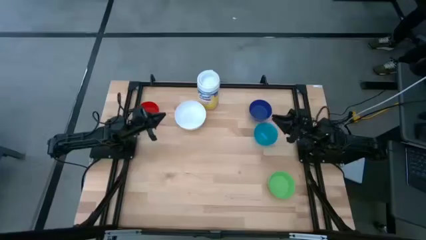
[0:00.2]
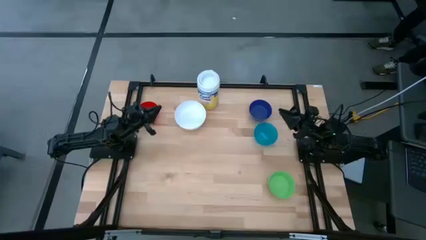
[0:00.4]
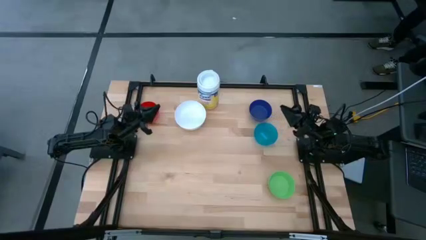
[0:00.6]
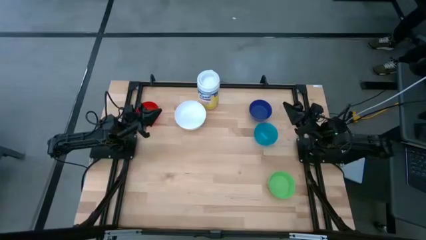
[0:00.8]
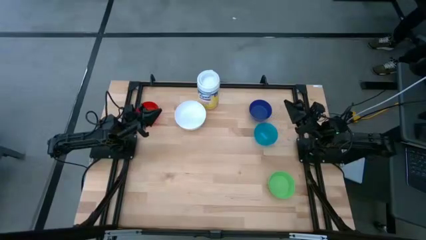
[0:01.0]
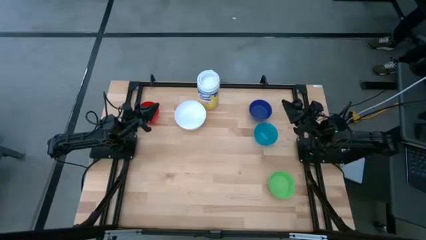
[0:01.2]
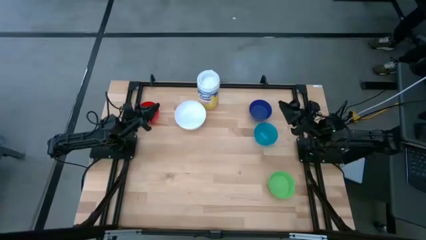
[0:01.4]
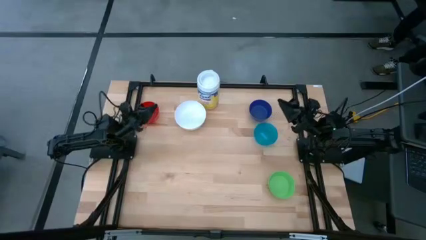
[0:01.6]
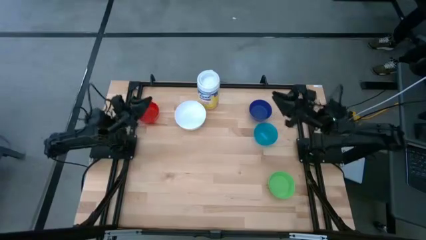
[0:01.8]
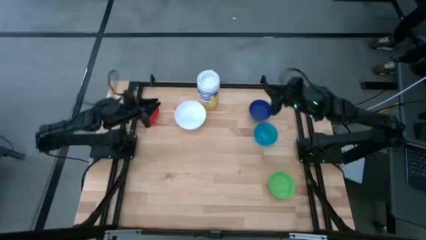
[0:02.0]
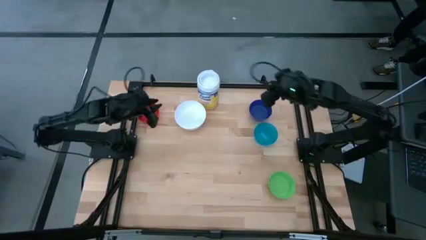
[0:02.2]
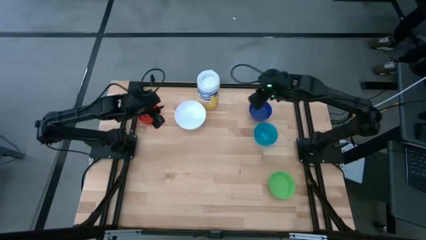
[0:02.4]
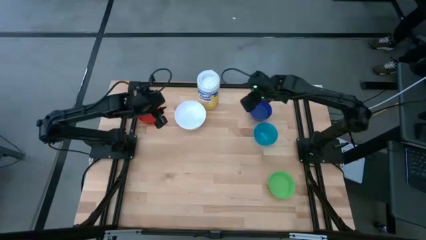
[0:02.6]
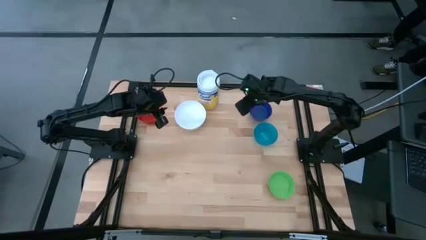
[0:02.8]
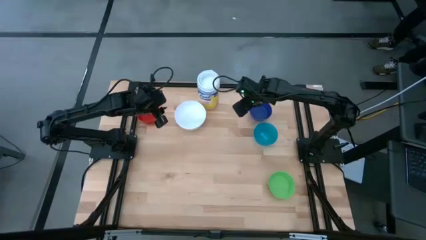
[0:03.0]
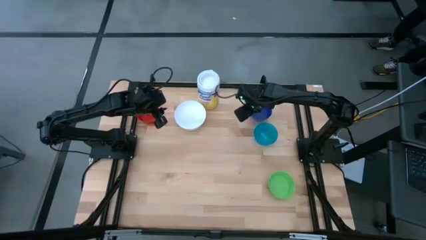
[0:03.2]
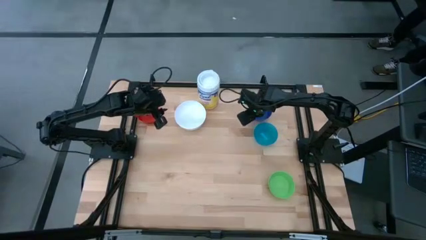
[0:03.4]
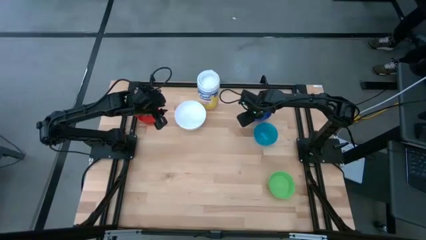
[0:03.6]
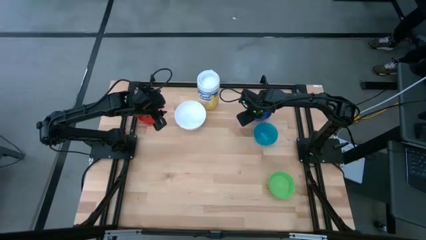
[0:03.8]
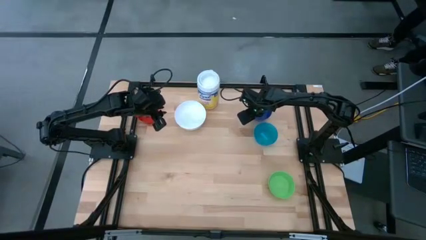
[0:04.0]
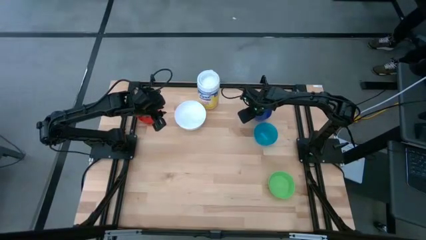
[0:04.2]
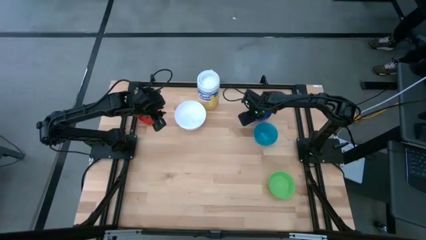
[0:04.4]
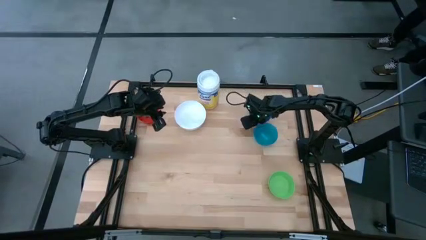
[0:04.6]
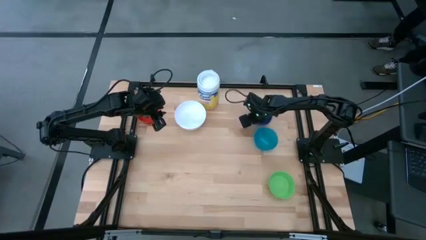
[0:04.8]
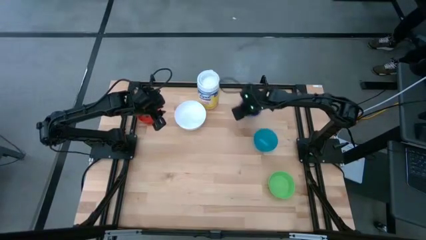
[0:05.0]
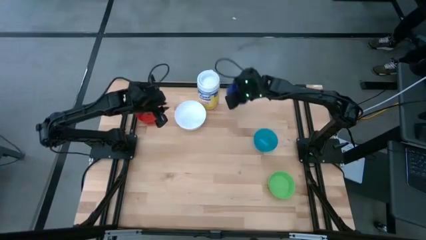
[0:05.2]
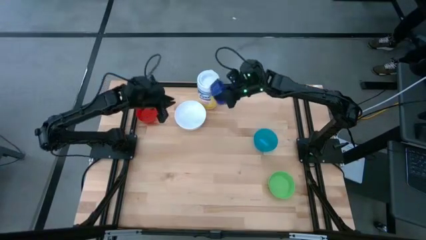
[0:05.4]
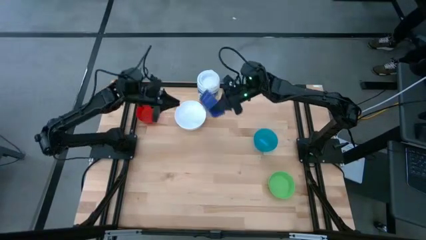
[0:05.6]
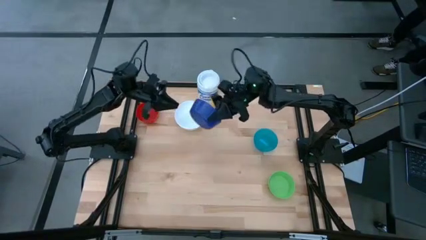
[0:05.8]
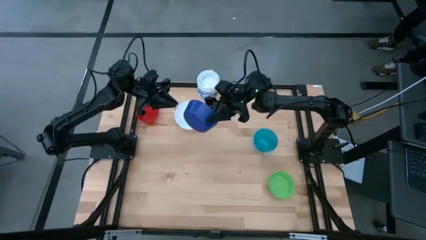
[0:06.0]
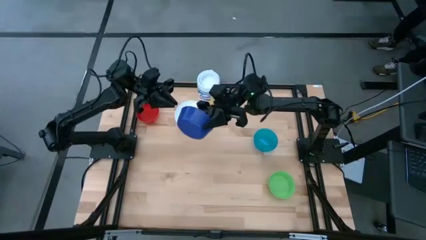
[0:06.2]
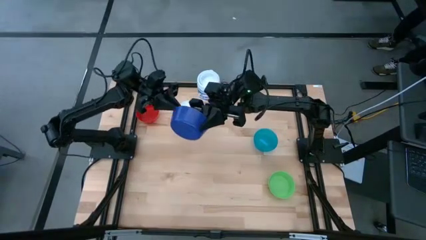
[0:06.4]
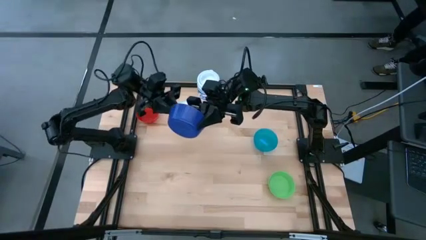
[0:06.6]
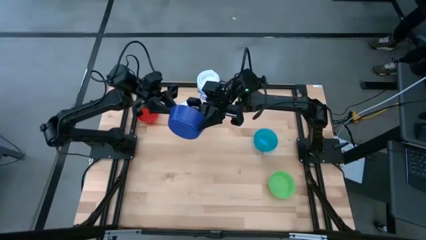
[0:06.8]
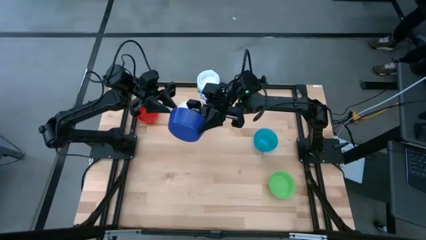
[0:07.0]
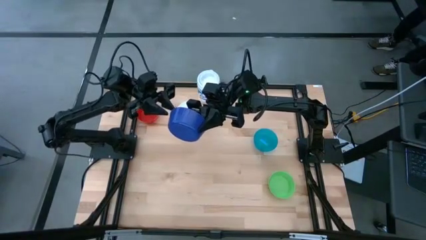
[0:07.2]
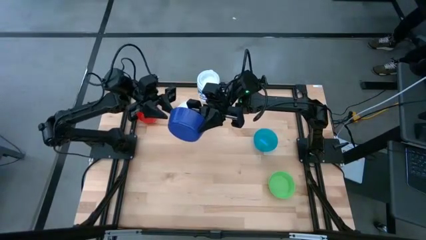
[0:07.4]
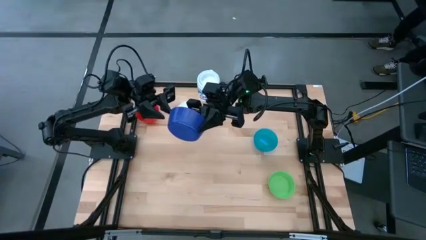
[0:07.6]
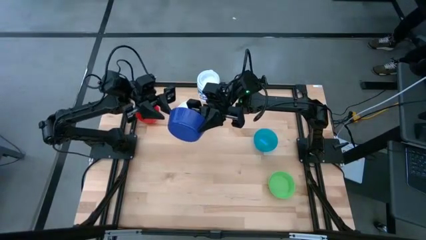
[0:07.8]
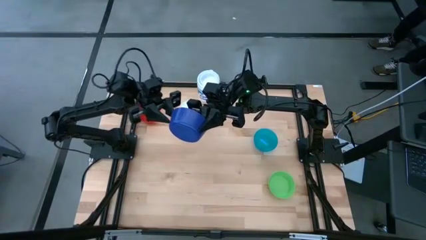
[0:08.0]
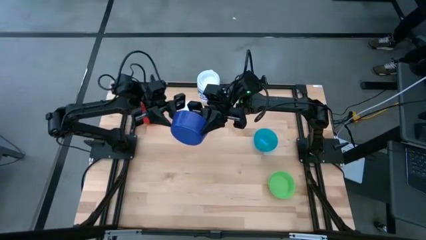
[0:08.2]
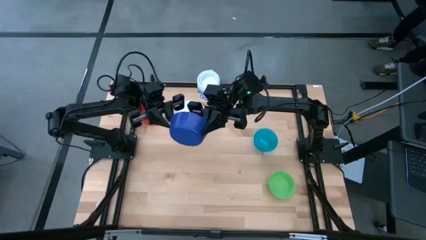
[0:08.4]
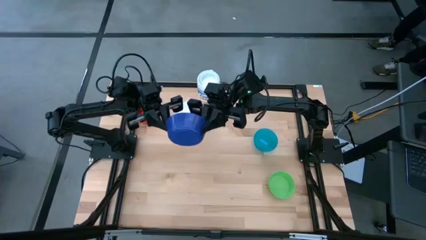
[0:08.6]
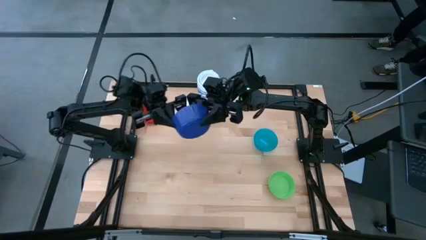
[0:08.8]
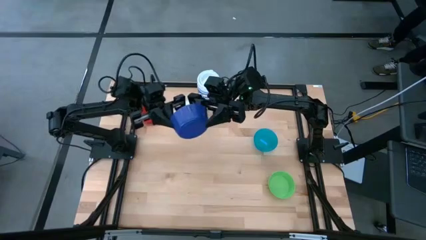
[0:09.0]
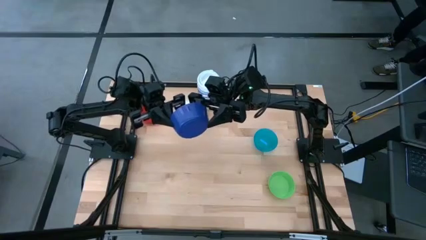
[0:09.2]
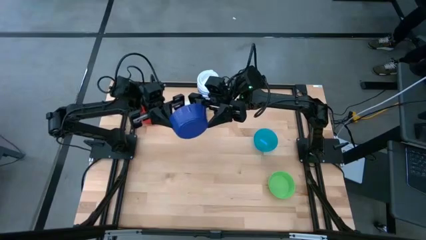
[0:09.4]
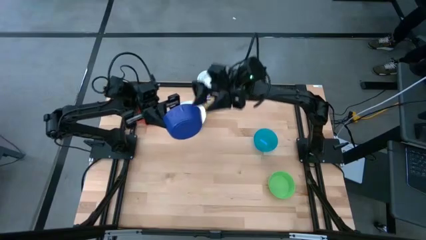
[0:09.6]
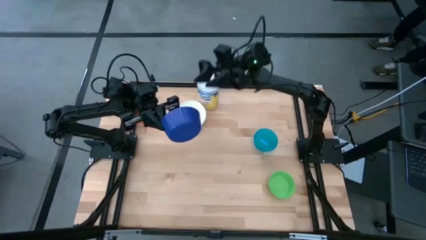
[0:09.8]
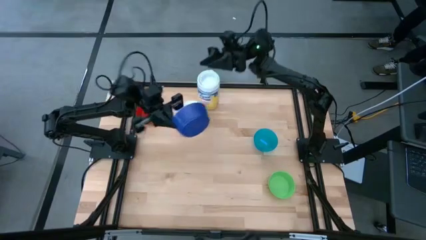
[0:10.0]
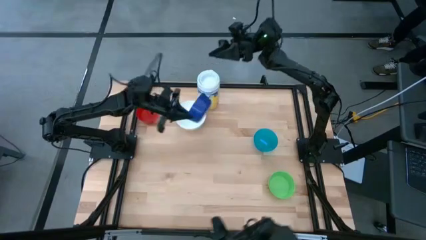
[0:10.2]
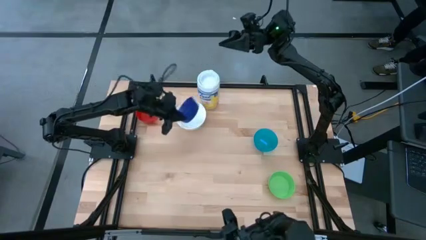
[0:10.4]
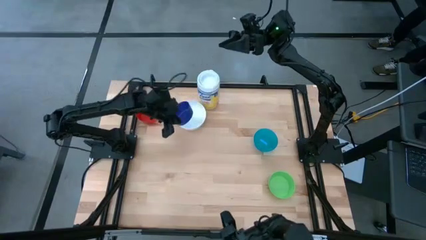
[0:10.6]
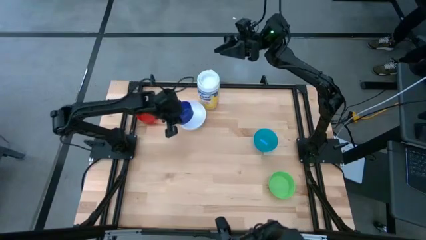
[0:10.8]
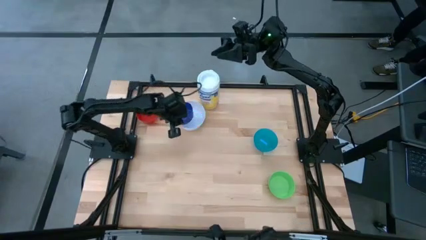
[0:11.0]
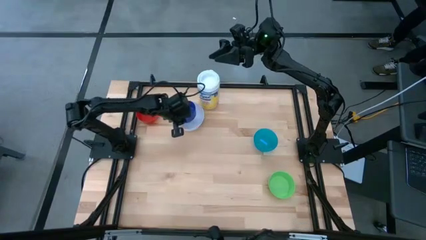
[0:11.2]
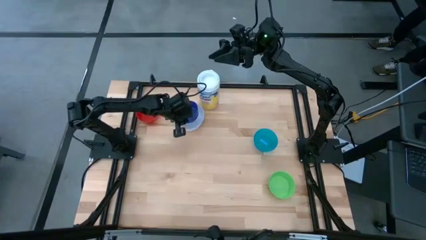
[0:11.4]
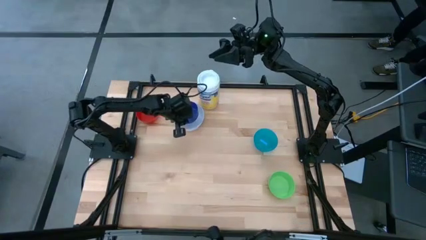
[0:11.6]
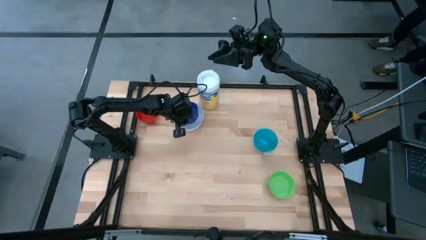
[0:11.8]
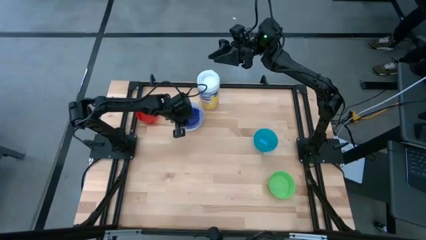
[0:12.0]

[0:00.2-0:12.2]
Stack the blue bowl on top of the white bowl
